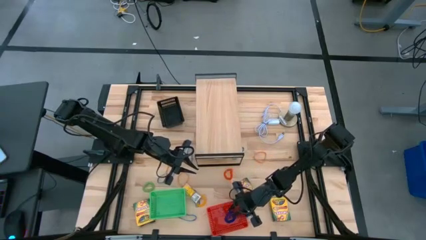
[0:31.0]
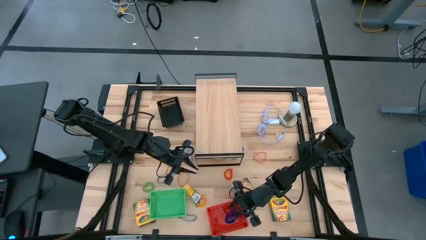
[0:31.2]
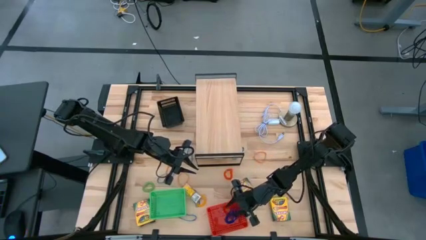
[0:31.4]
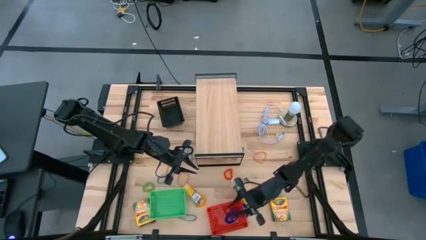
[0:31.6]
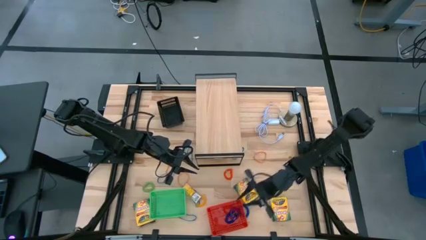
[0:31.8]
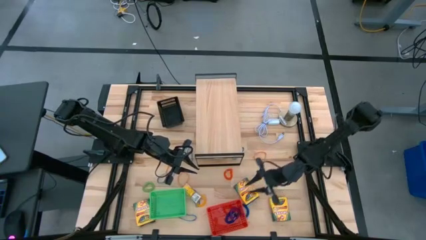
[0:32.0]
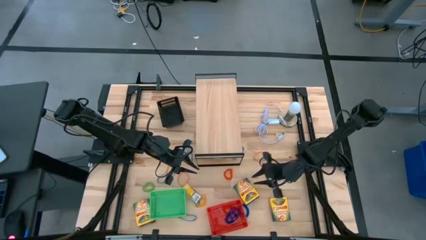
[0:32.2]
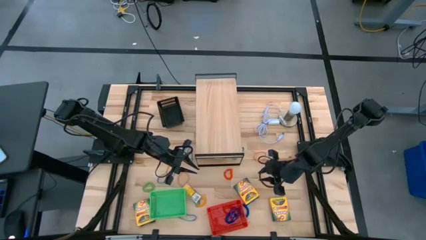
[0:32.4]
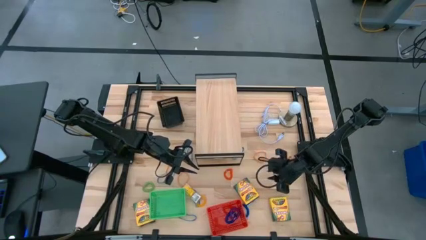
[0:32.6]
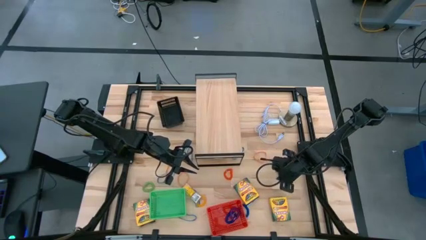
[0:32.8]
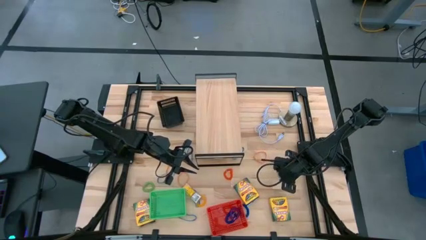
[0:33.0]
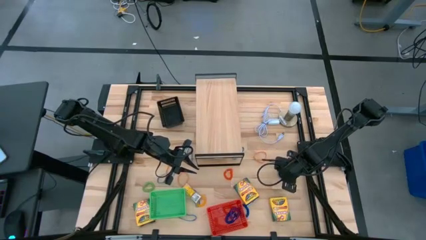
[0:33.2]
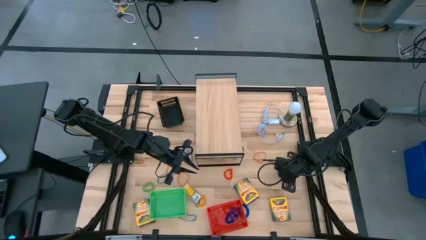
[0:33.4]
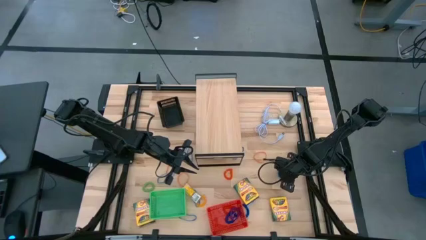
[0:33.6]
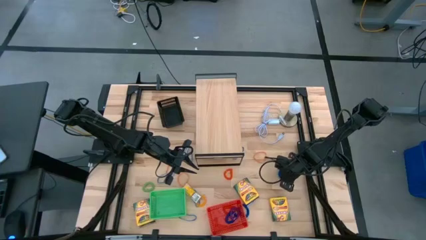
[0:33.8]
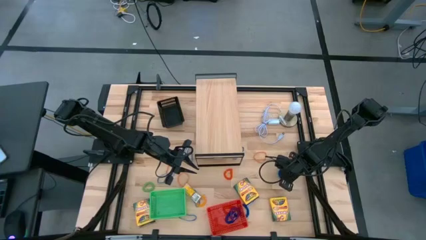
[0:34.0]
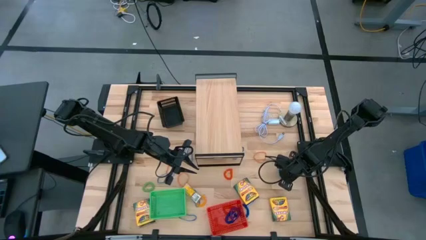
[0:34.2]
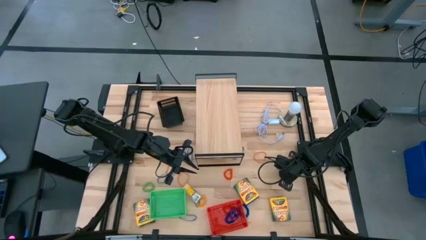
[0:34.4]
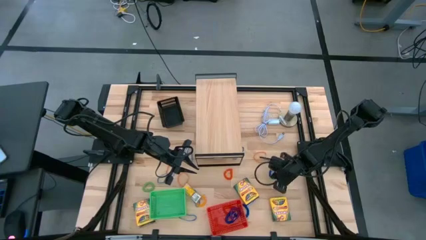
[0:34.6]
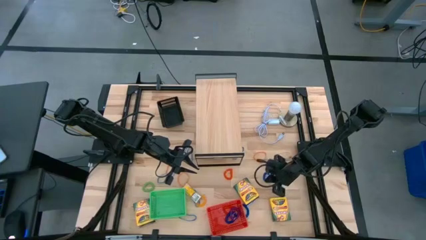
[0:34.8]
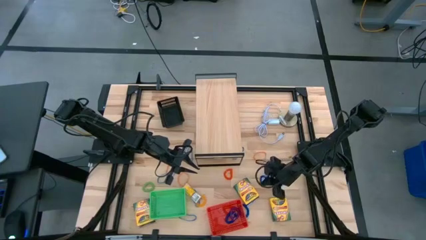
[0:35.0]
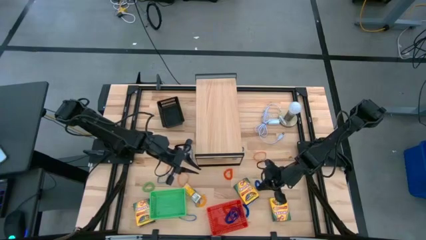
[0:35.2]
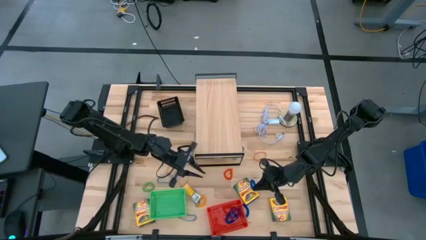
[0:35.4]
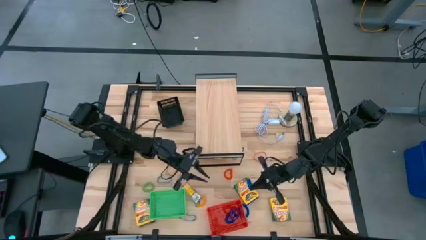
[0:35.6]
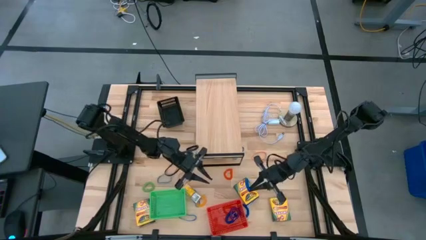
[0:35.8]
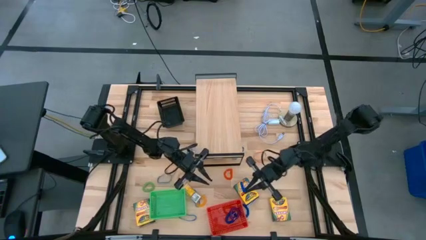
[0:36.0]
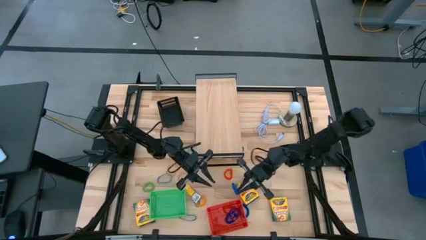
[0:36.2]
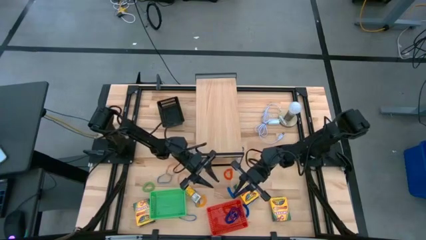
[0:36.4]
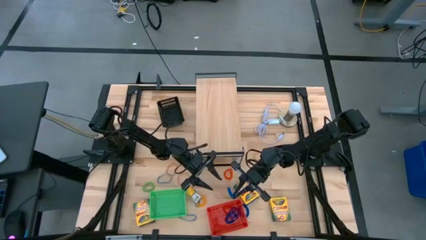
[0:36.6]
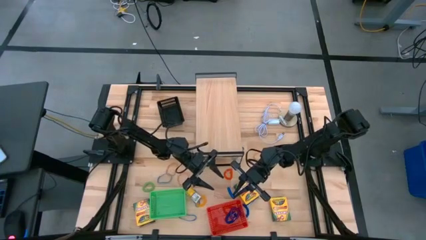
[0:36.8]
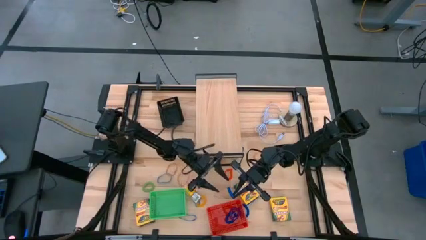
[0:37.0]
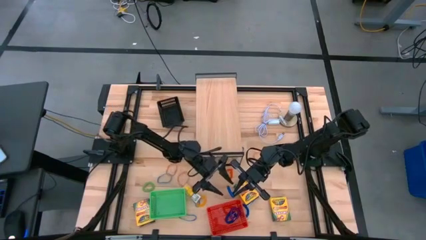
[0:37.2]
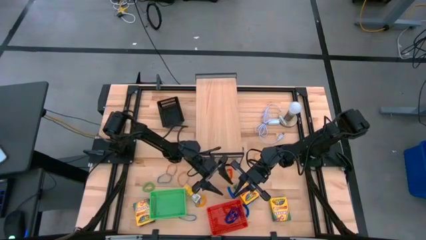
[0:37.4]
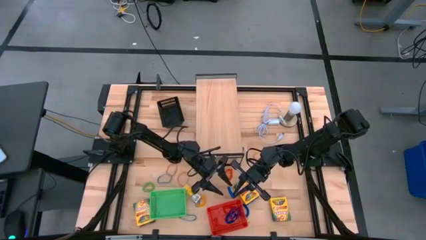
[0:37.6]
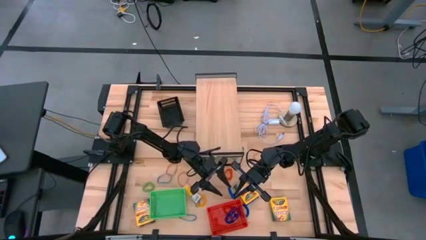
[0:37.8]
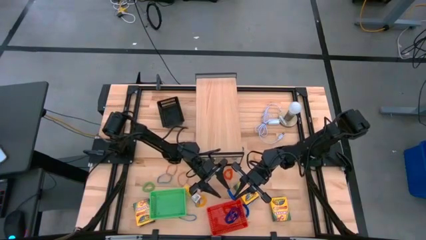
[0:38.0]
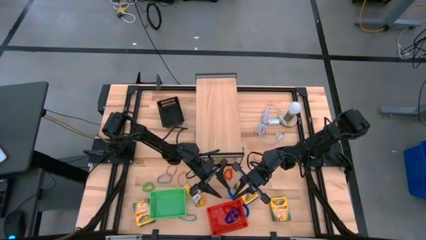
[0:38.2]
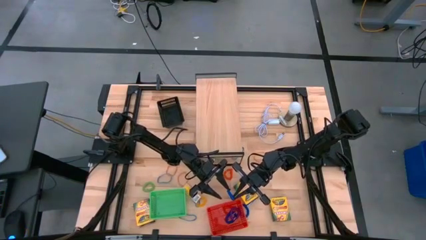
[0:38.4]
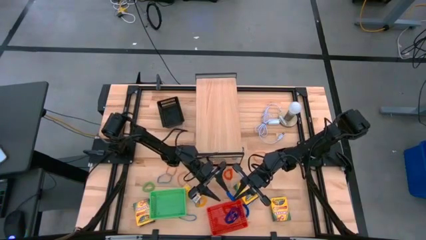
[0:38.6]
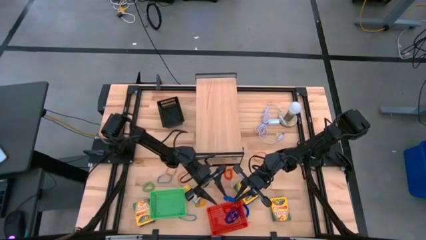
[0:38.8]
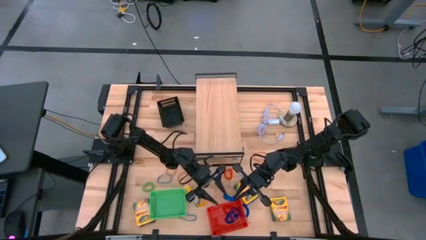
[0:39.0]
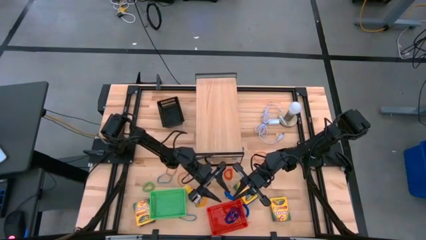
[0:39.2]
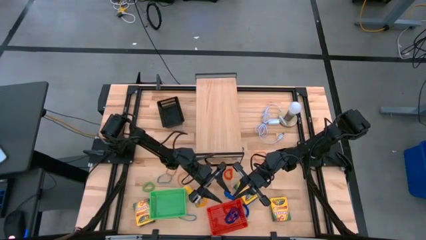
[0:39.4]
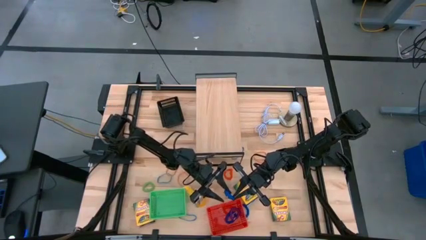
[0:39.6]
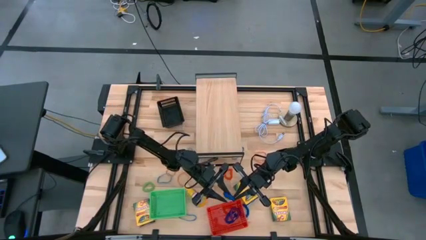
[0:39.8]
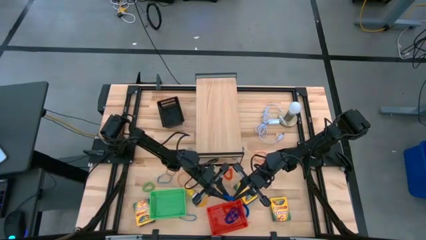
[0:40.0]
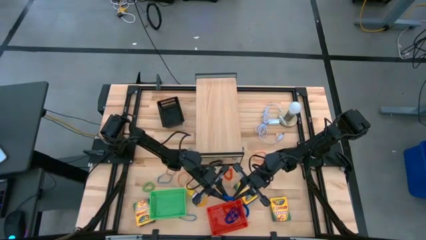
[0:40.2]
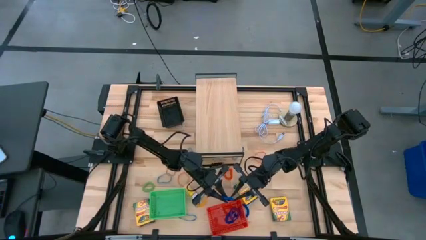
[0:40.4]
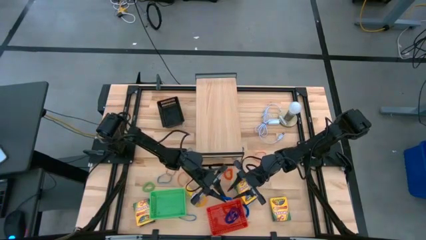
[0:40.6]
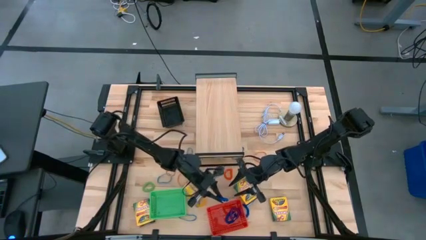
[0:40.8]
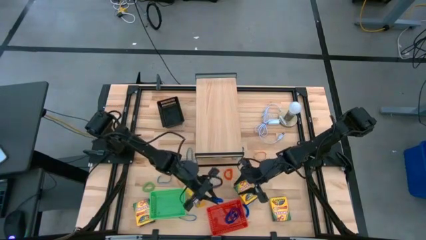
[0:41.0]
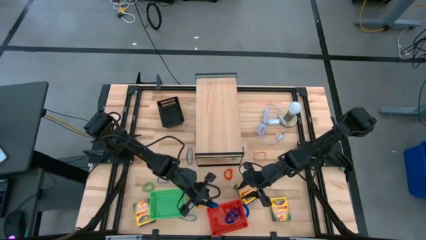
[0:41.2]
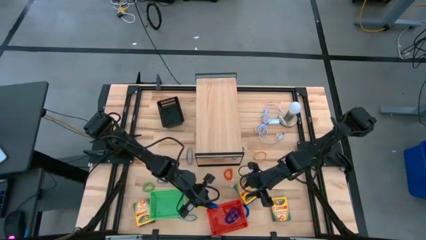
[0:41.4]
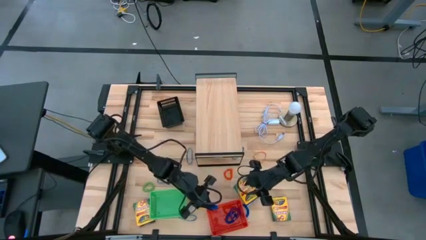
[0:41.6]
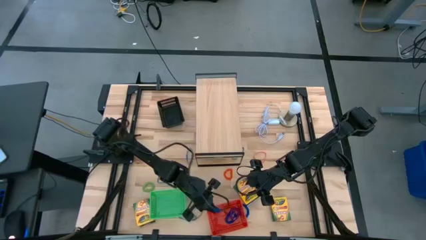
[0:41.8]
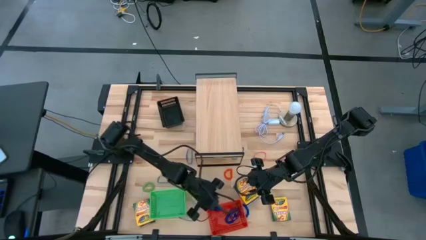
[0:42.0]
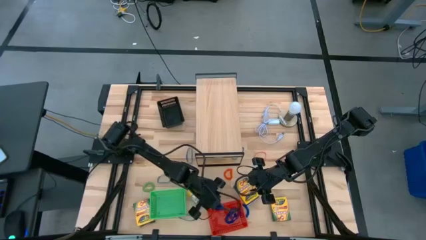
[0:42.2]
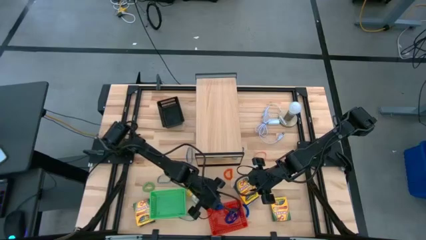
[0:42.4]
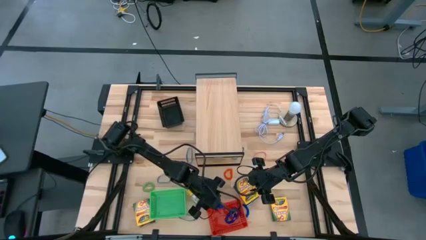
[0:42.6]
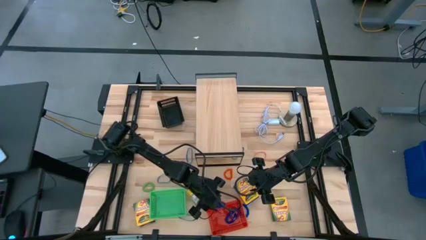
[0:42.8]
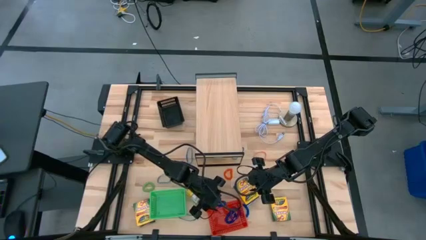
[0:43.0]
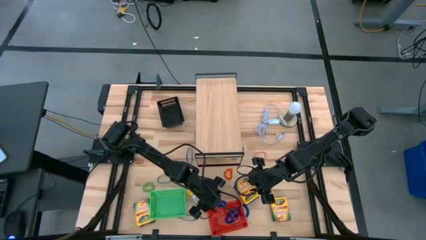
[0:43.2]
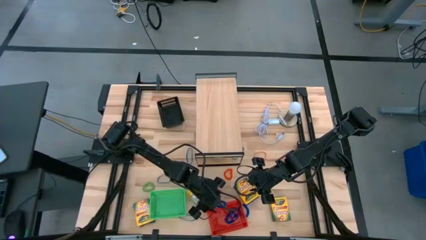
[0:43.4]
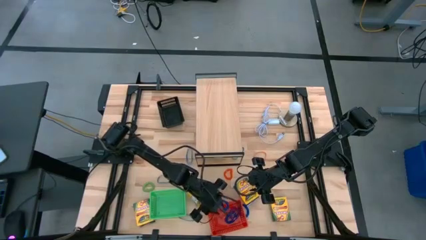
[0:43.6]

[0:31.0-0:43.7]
Task: Pick & Place Office Desk Supplies
Put the blue spring keychain into the red basket

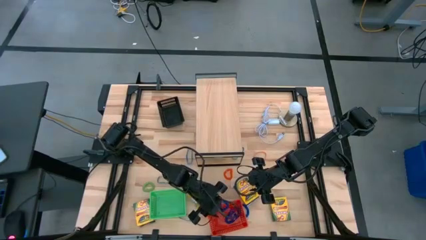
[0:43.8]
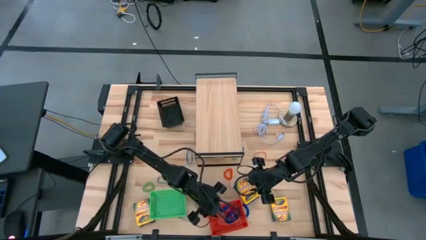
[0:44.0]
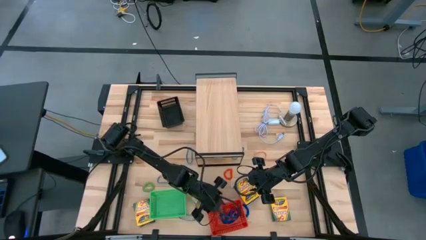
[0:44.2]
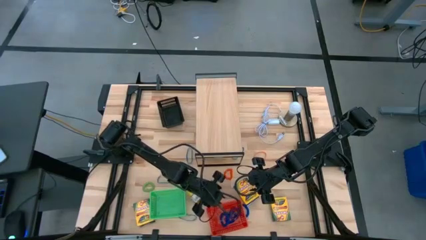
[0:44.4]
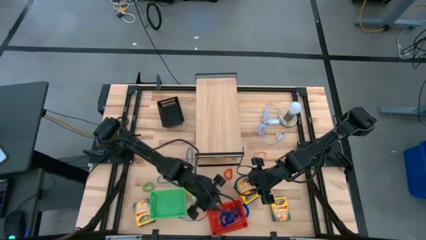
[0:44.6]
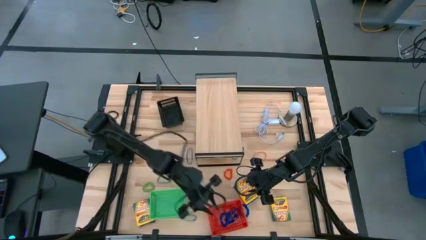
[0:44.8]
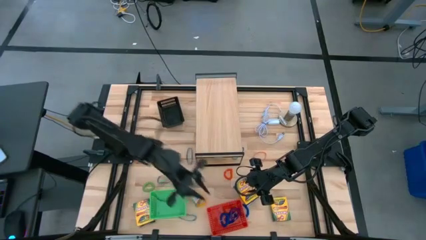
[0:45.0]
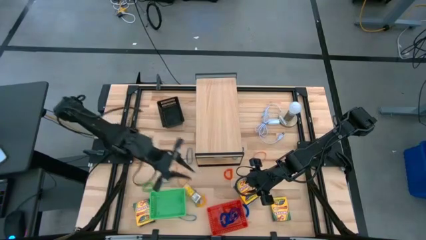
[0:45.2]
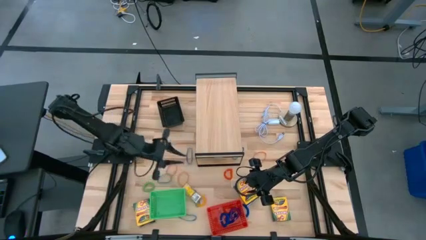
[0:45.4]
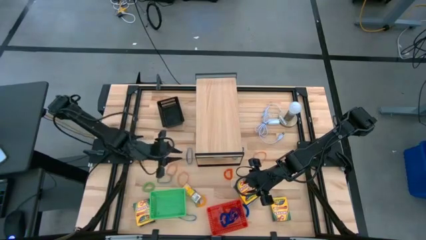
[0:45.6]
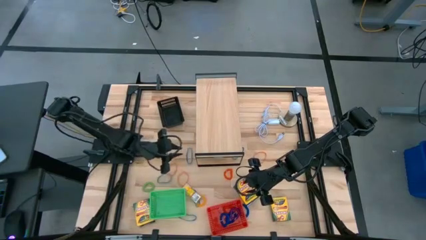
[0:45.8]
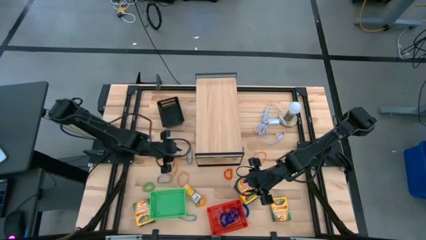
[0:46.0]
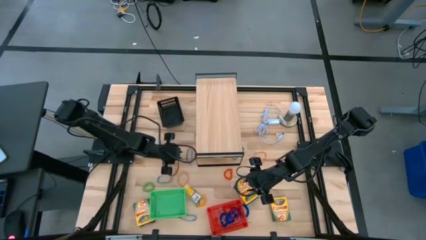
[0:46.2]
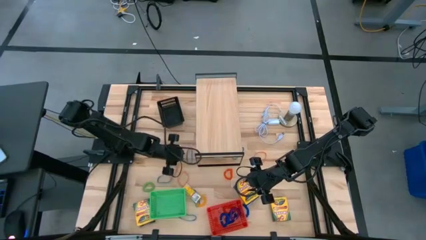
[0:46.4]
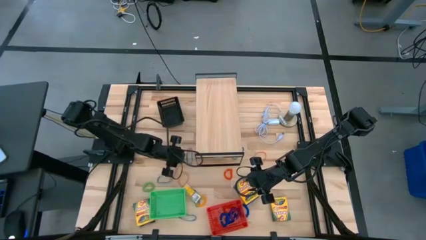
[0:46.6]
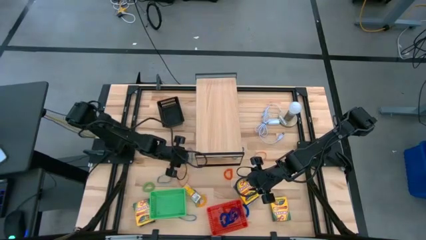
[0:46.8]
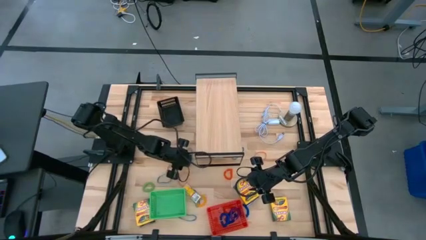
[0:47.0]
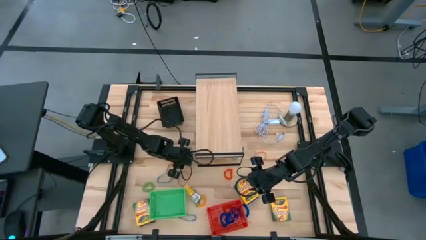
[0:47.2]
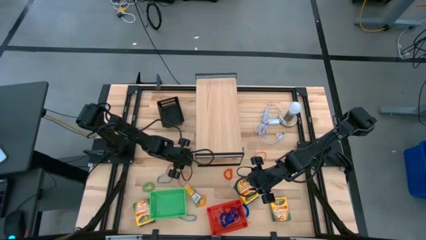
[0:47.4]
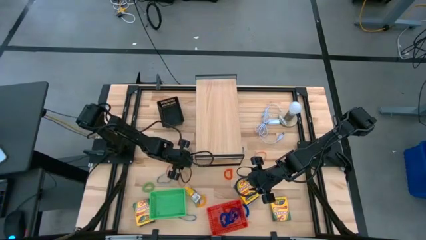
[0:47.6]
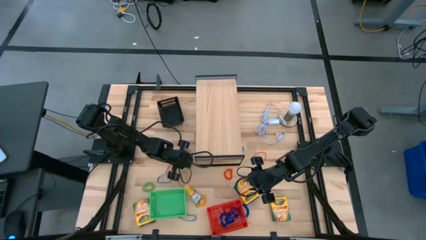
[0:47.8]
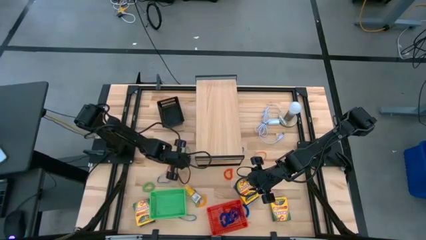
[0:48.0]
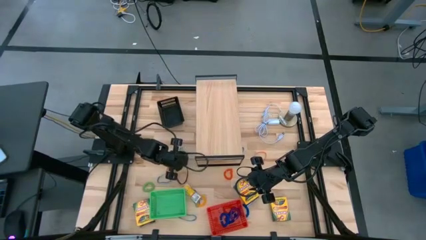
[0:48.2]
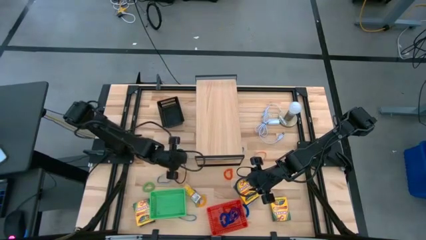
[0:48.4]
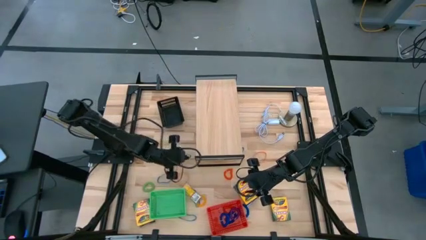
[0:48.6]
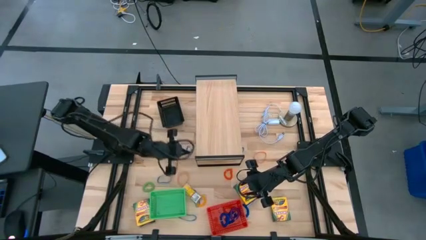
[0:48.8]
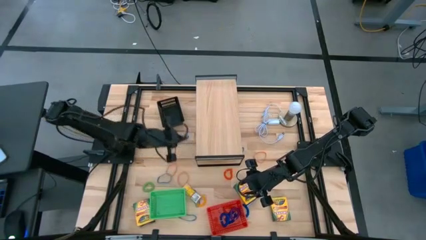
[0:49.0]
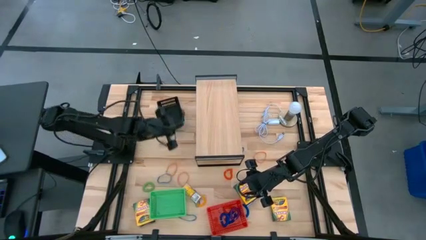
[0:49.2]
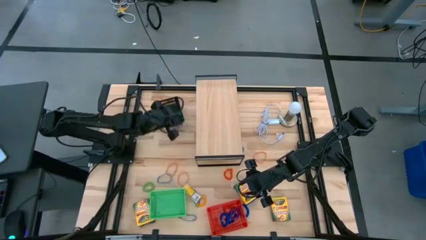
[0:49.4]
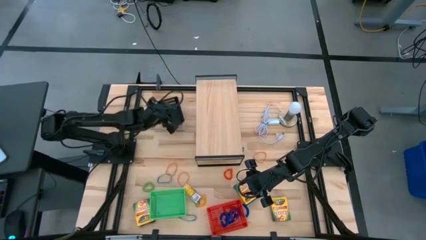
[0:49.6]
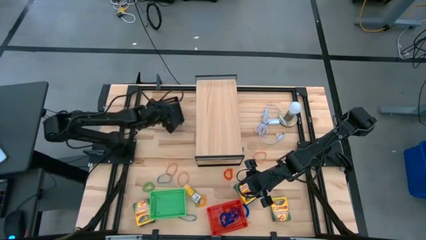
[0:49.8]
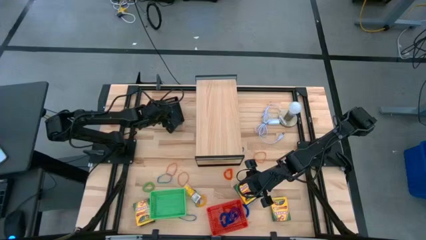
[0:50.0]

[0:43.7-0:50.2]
Put the blue rubber band into the black basket
